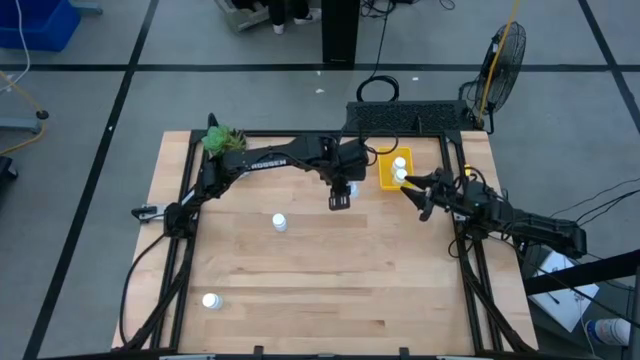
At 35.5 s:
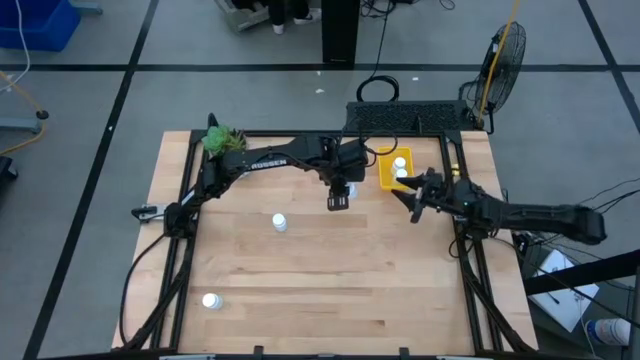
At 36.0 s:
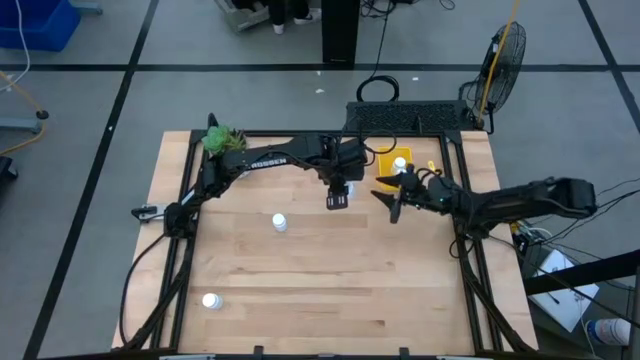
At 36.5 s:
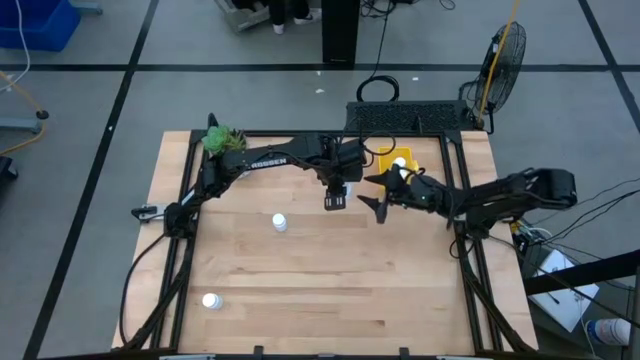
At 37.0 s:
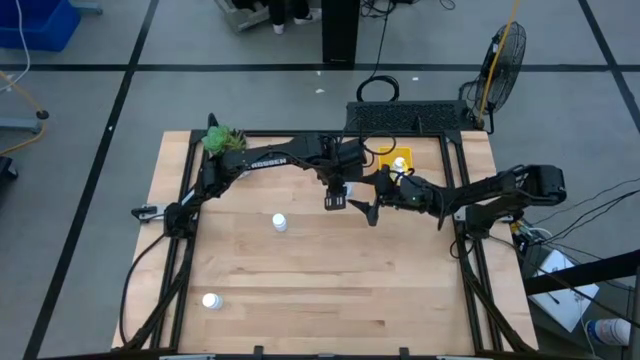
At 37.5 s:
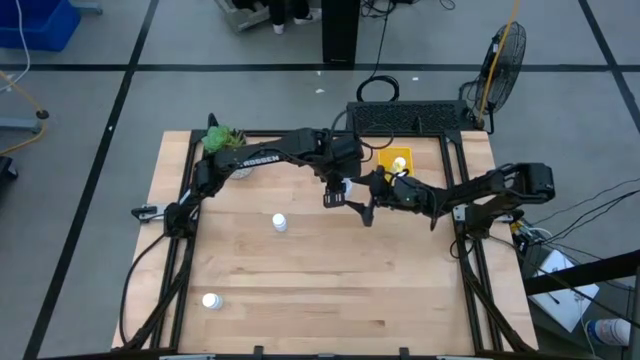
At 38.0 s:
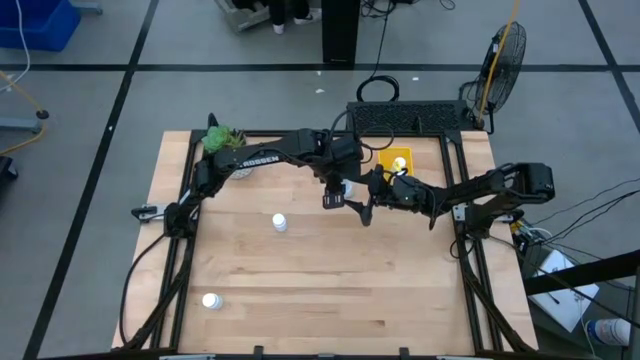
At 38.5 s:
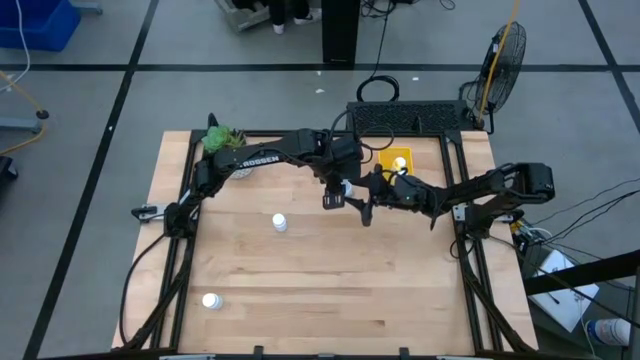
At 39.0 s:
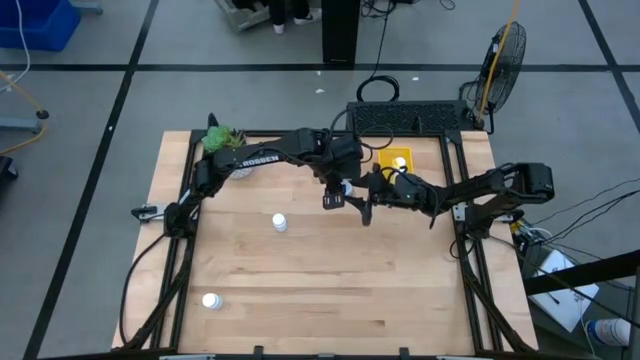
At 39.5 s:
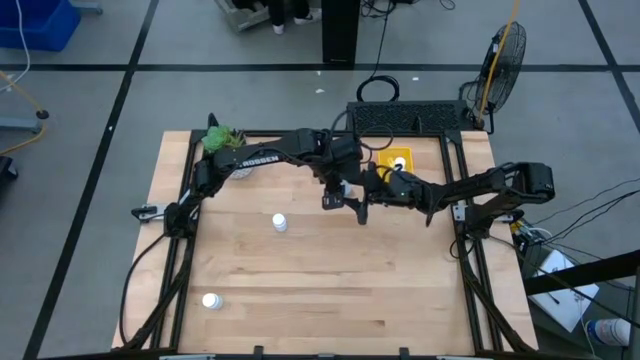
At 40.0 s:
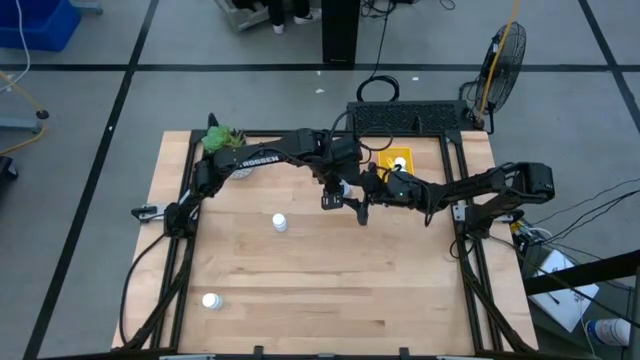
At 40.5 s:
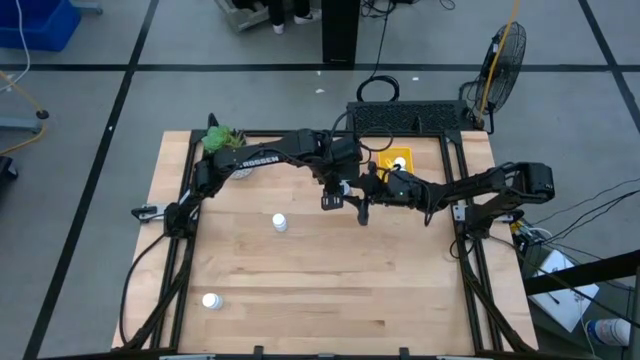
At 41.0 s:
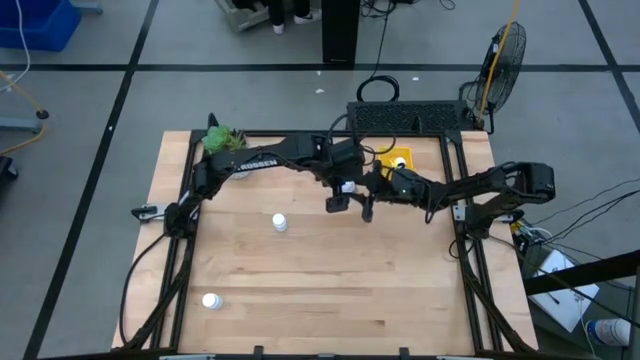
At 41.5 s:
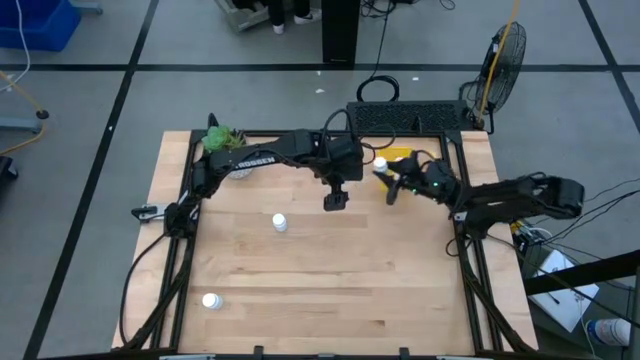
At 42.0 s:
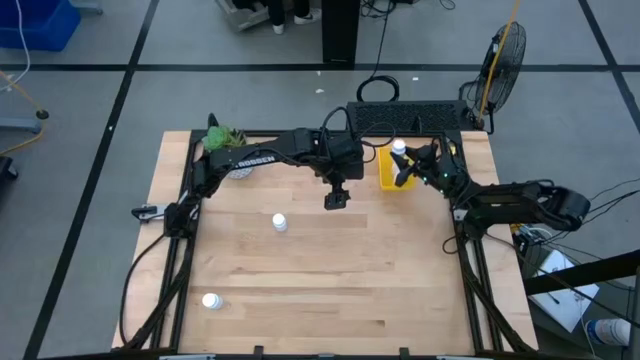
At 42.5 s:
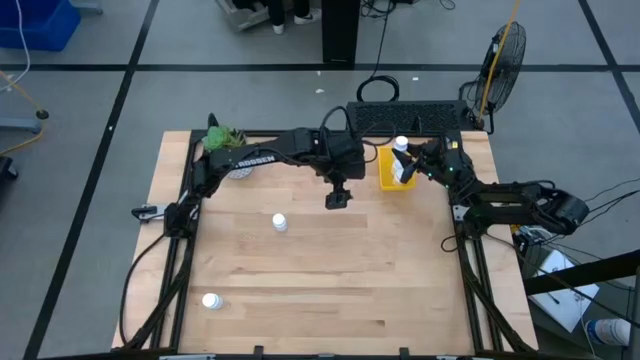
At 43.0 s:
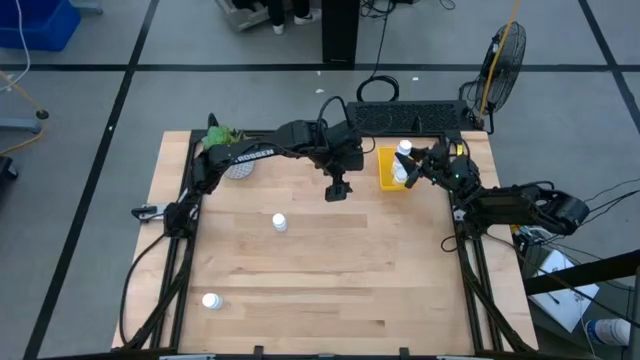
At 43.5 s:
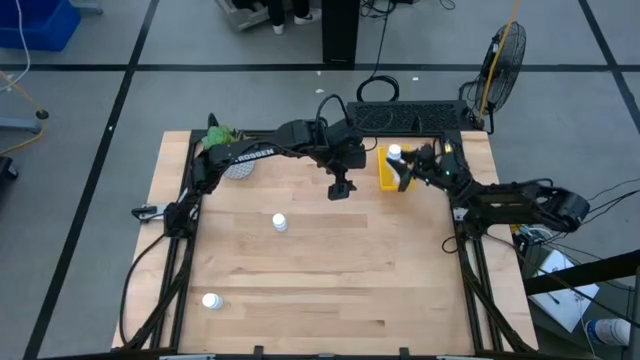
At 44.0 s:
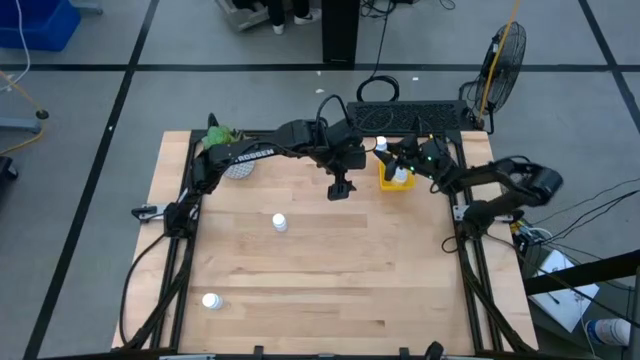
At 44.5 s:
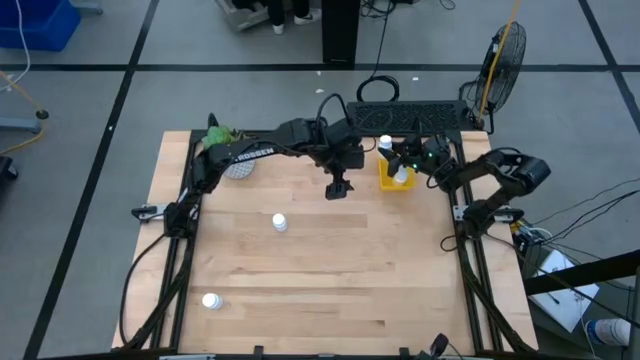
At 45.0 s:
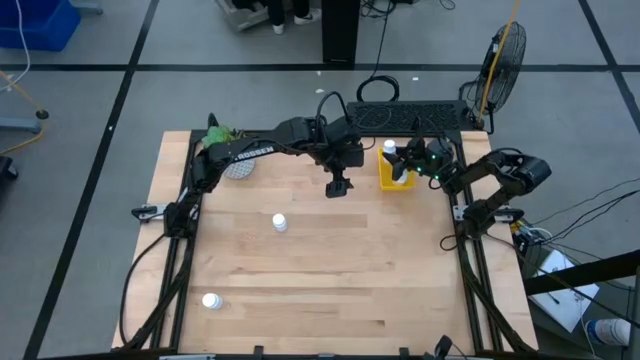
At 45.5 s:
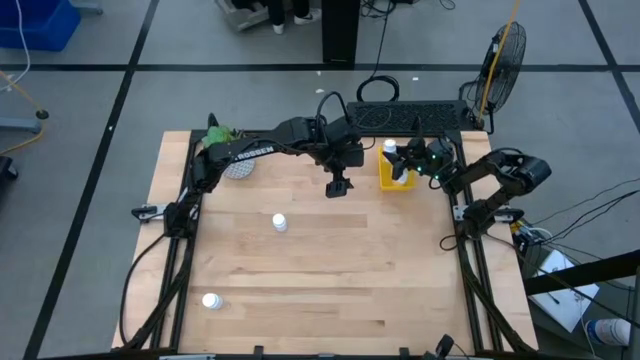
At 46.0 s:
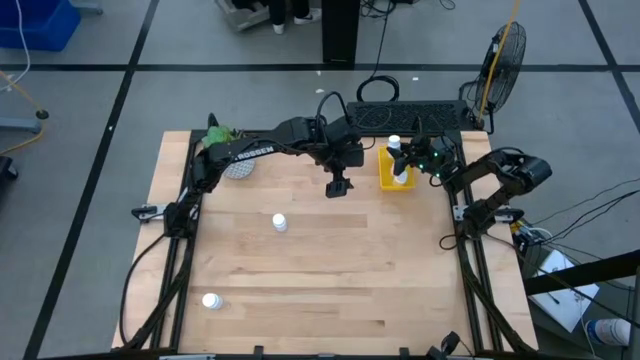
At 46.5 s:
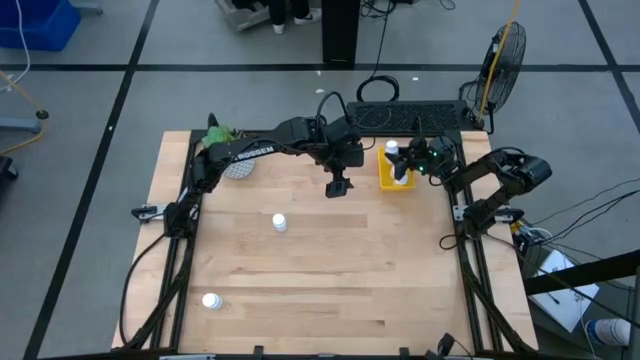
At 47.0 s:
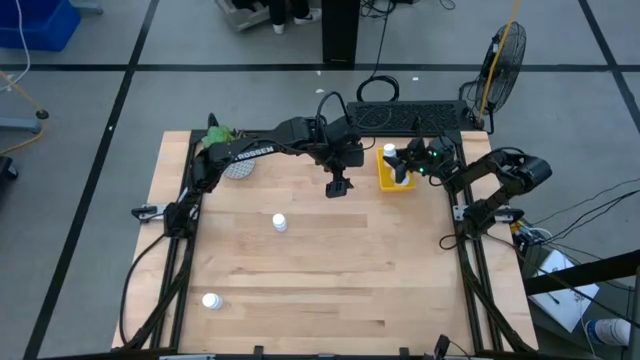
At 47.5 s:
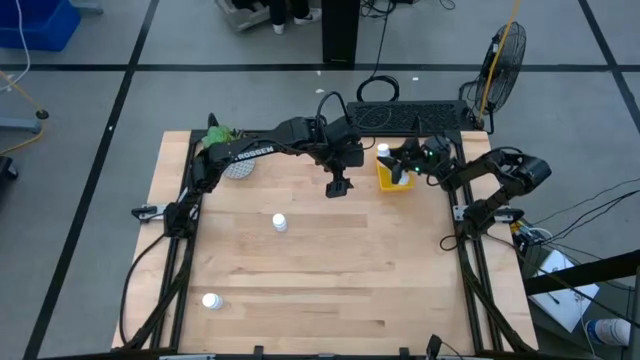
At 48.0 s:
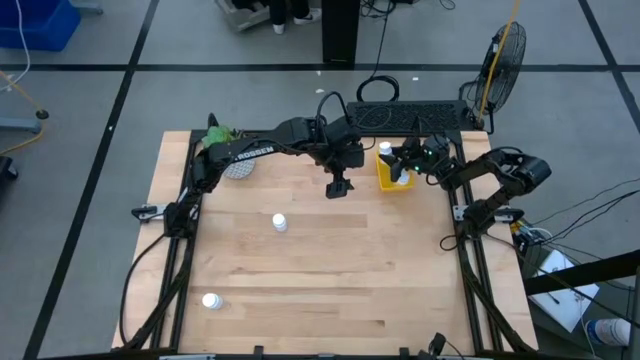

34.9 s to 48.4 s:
Task: Pick and place pill bottles into a basket
Put the top white medicine bottle into the yellow bin

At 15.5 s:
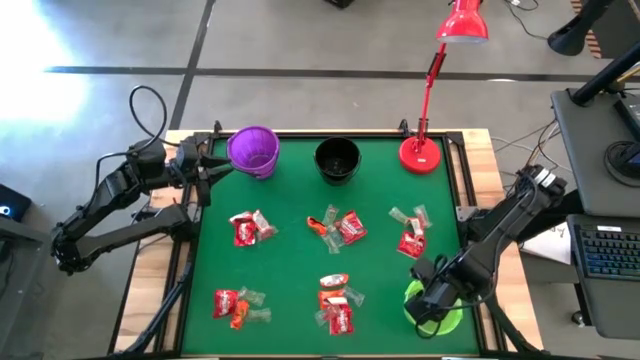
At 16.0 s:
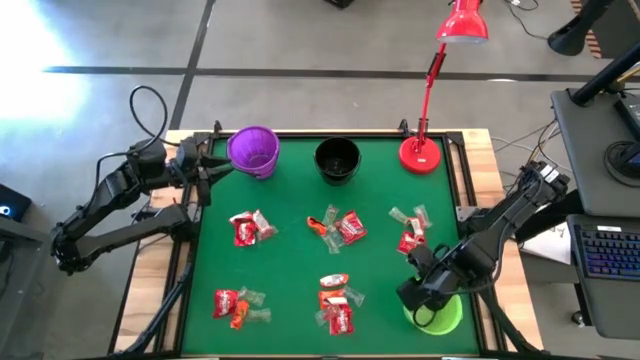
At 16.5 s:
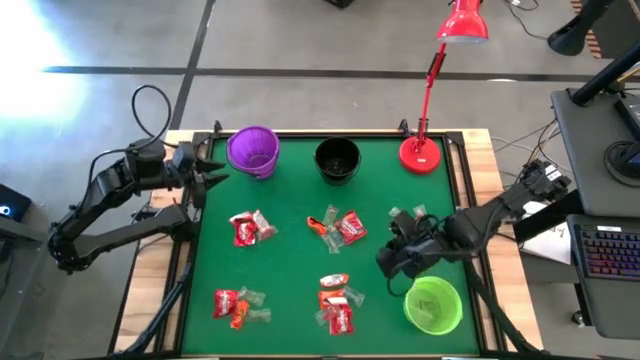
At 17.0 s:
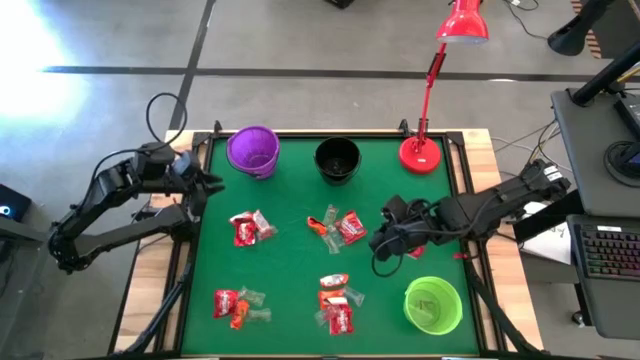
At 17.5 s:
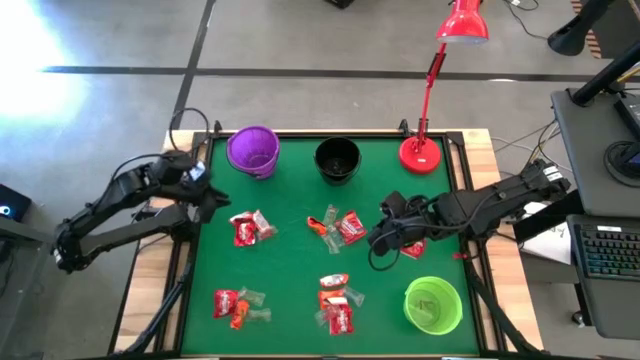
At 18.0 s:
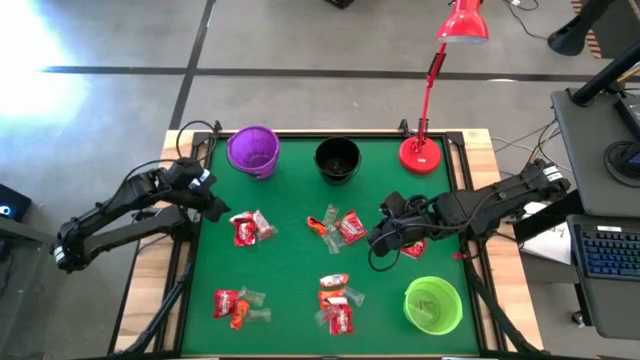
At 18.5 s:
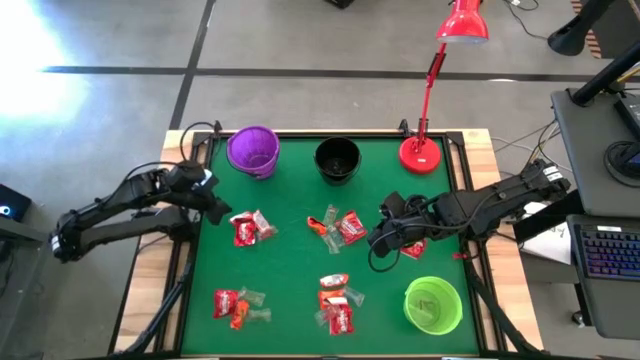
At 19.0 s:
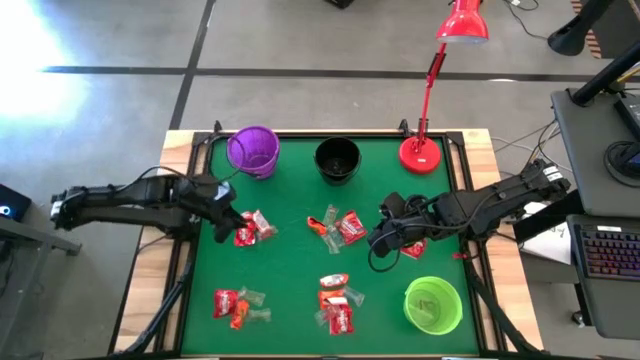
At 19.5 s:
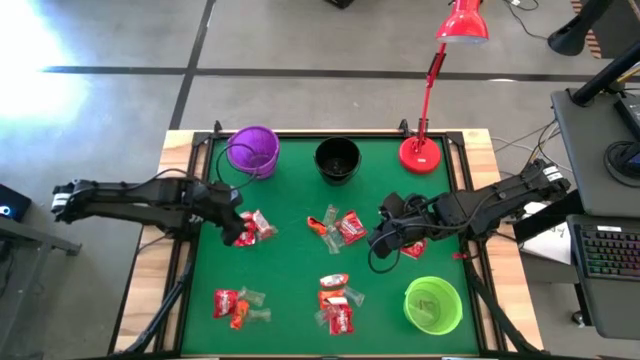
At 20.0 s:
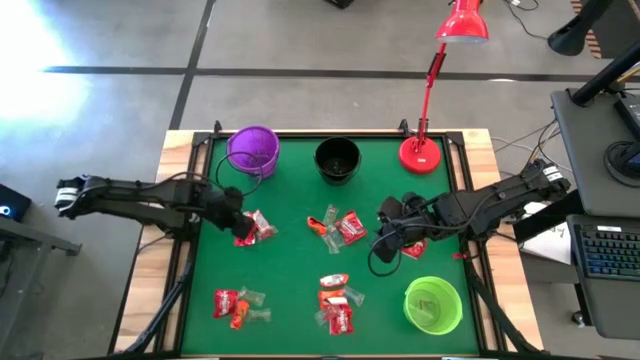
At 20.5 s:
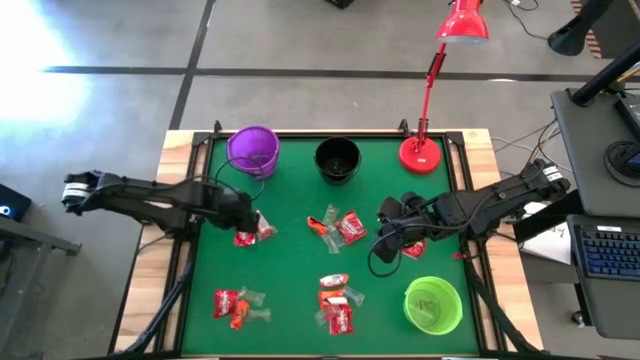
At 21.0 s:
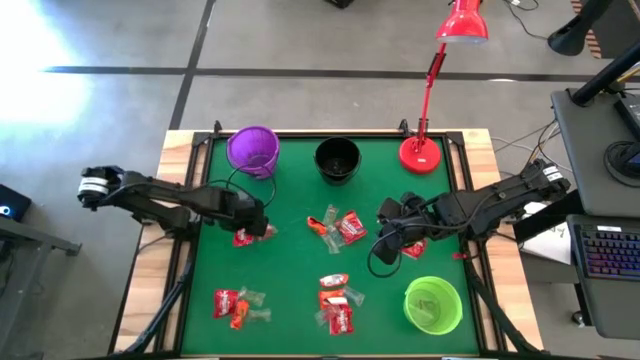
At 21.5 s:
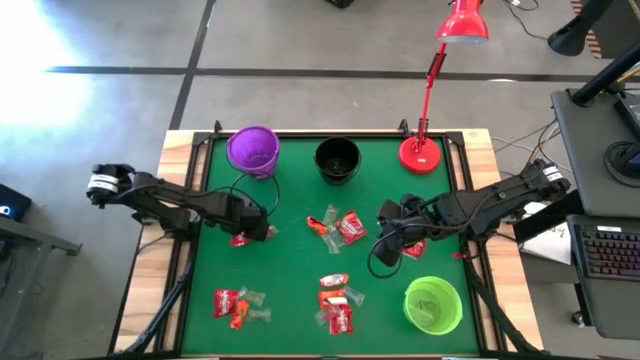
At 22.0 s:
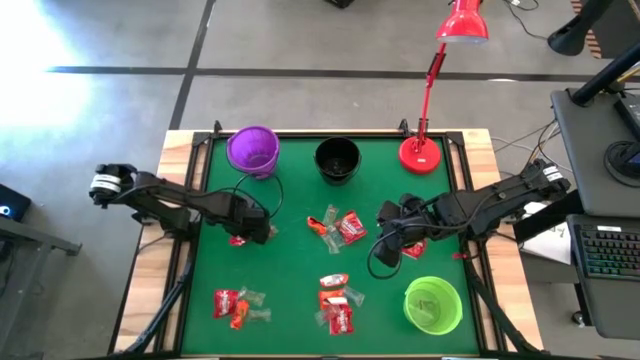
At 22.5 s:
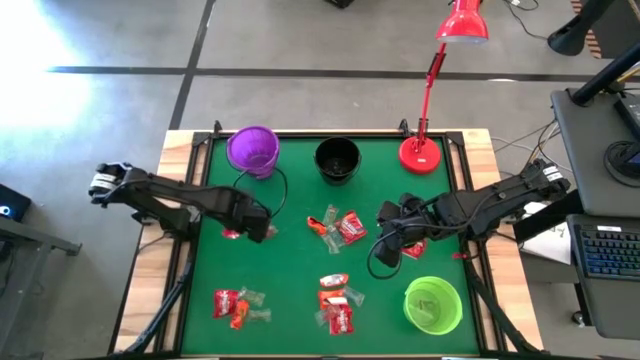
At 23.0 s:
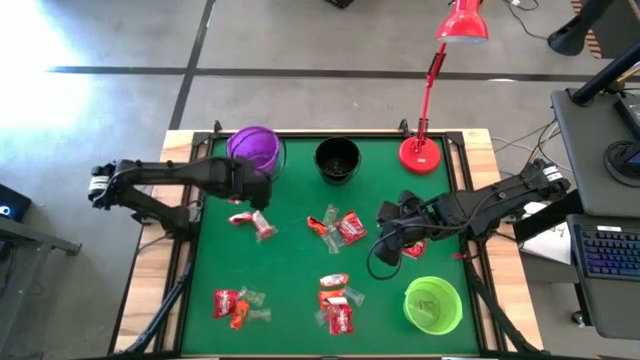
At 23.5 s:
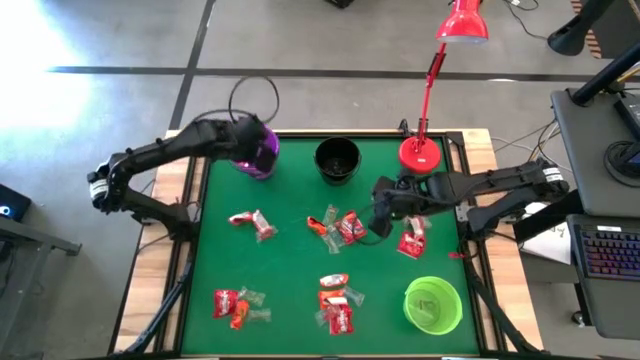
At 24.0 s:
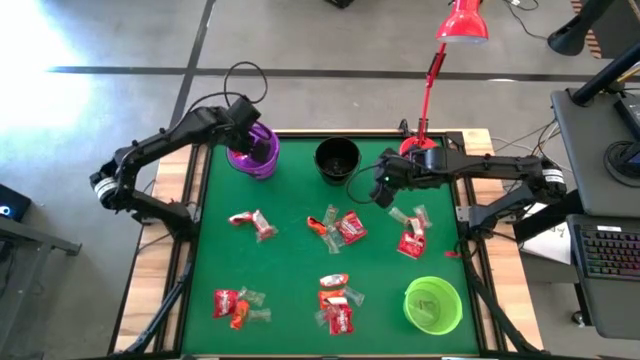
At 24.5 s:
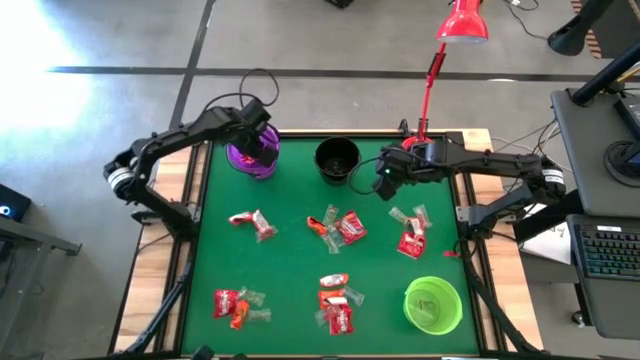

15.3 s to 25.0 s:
Task: Sort candy
Put the red candy into the purple bucket
